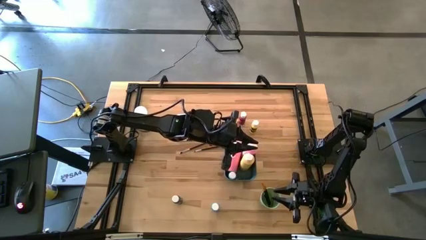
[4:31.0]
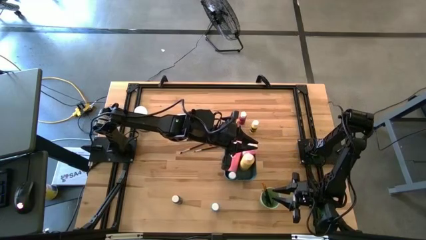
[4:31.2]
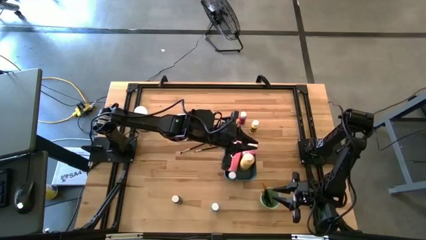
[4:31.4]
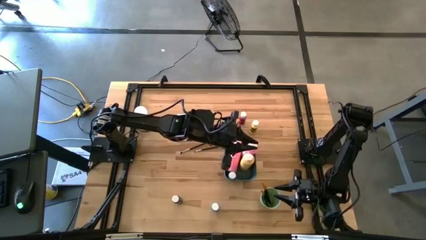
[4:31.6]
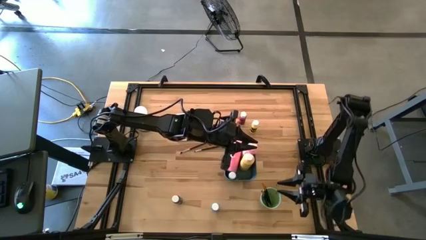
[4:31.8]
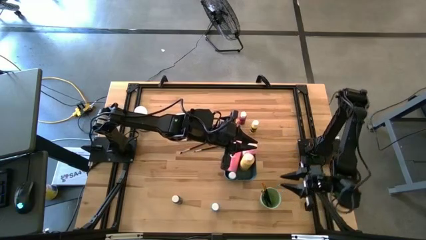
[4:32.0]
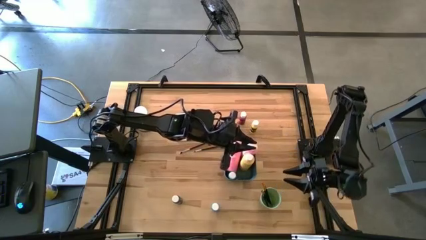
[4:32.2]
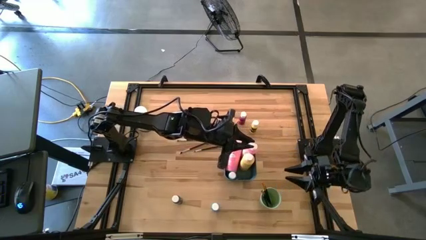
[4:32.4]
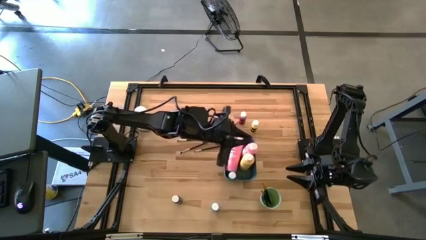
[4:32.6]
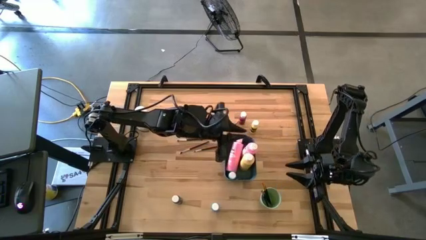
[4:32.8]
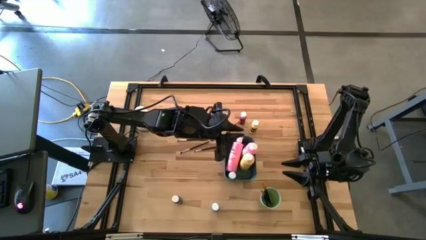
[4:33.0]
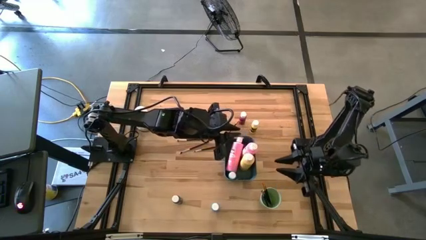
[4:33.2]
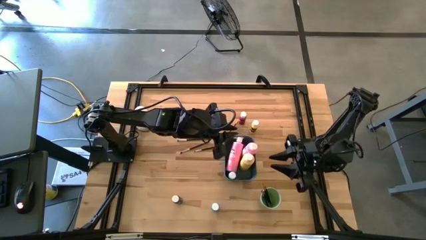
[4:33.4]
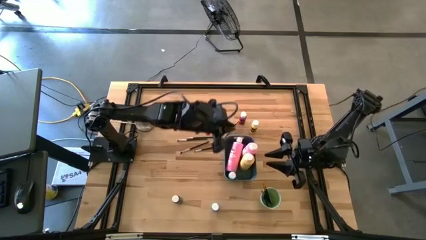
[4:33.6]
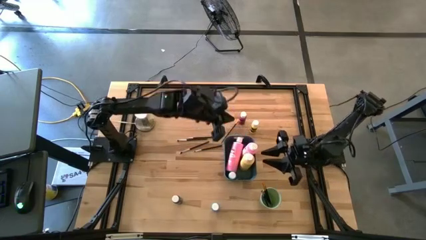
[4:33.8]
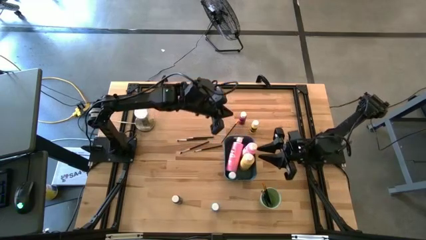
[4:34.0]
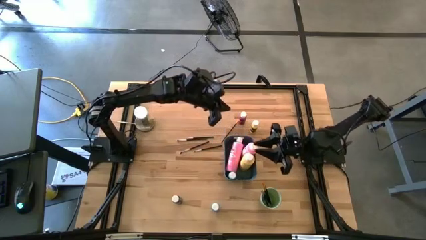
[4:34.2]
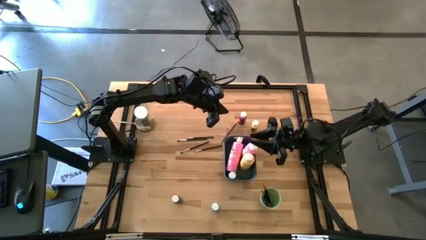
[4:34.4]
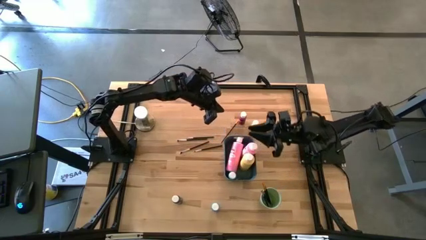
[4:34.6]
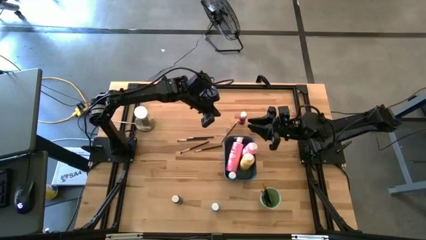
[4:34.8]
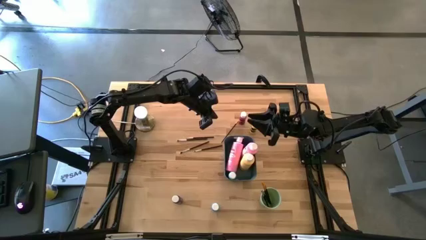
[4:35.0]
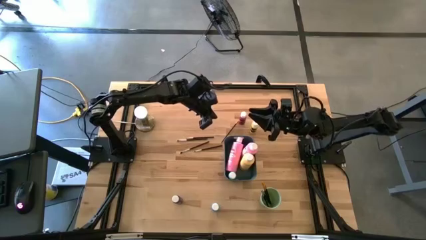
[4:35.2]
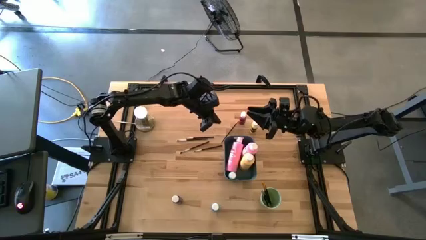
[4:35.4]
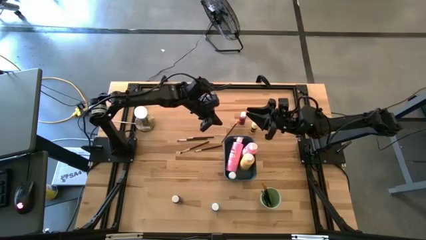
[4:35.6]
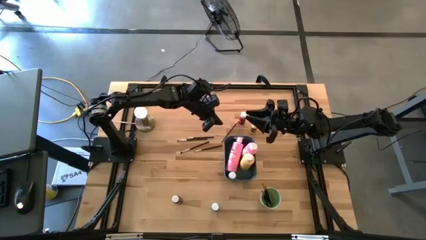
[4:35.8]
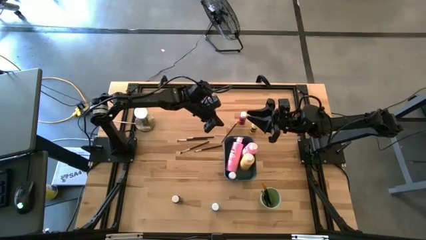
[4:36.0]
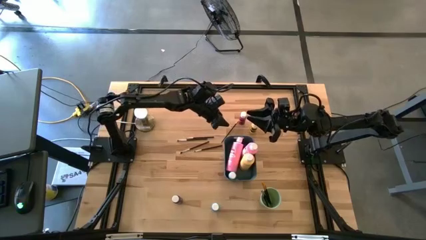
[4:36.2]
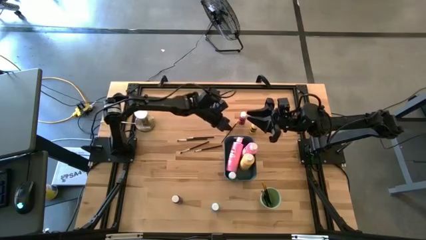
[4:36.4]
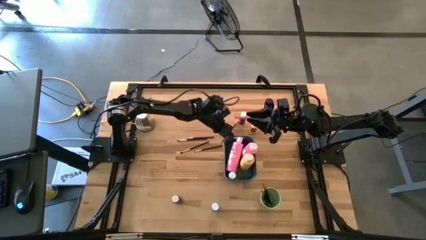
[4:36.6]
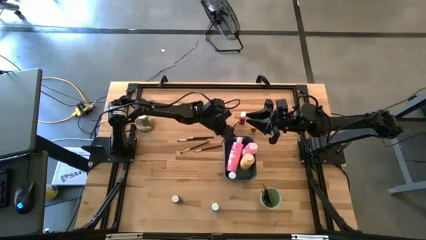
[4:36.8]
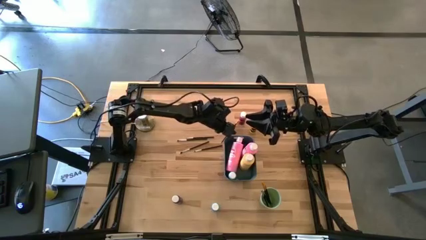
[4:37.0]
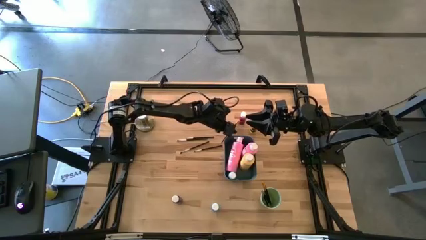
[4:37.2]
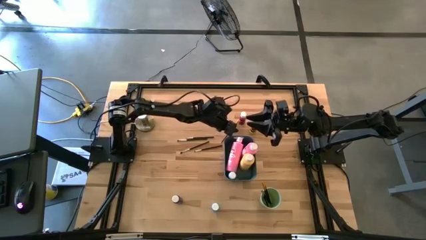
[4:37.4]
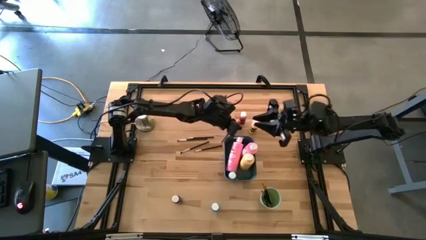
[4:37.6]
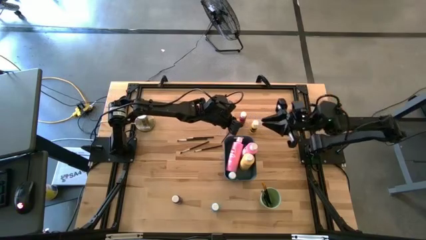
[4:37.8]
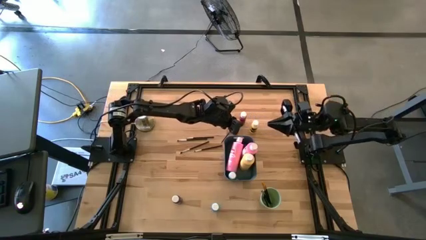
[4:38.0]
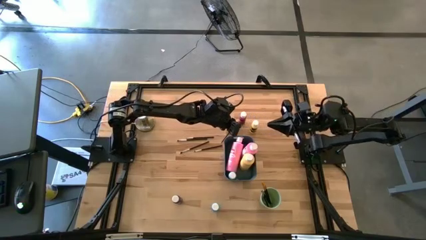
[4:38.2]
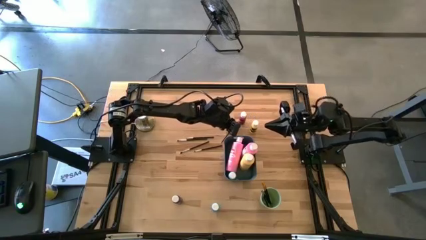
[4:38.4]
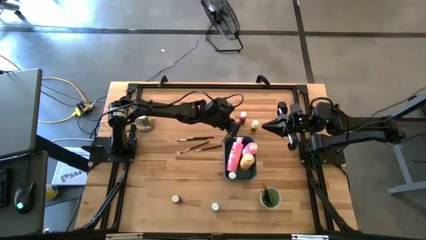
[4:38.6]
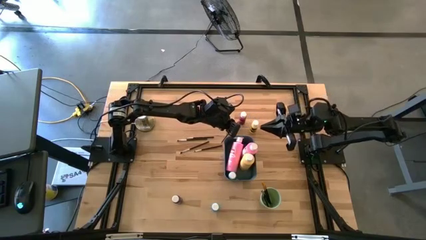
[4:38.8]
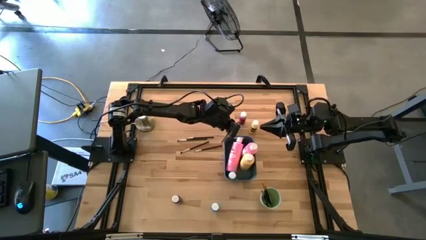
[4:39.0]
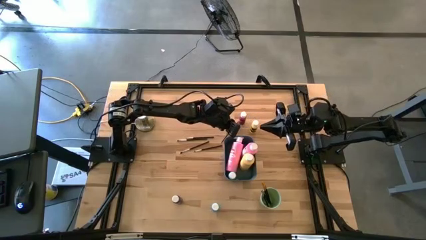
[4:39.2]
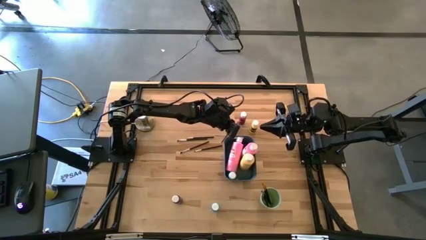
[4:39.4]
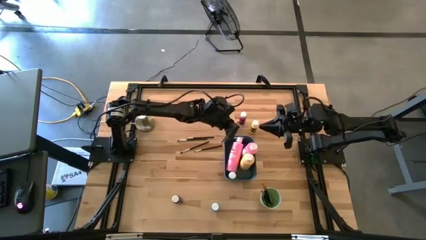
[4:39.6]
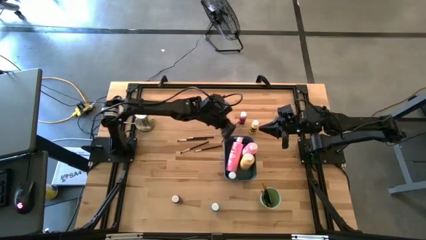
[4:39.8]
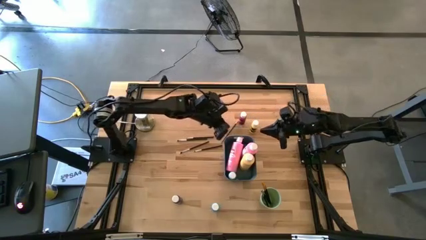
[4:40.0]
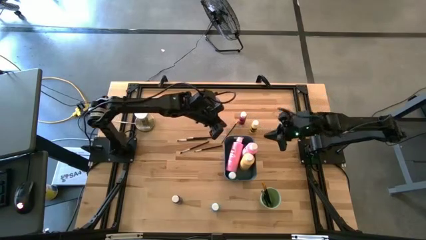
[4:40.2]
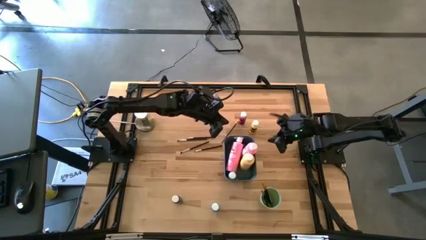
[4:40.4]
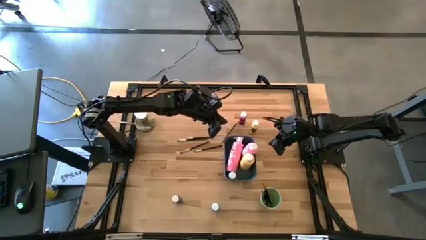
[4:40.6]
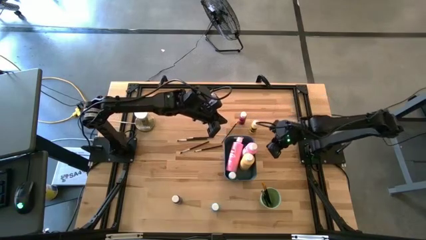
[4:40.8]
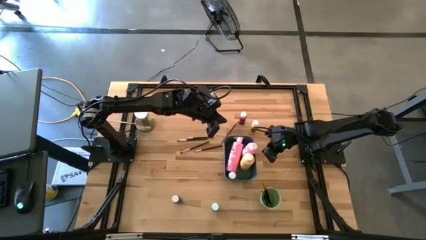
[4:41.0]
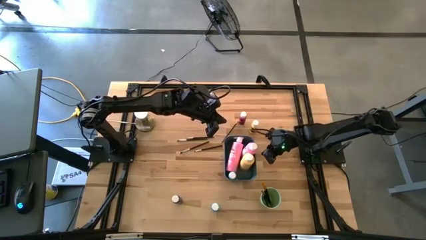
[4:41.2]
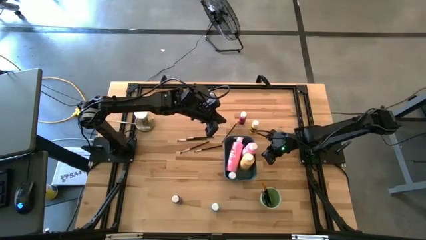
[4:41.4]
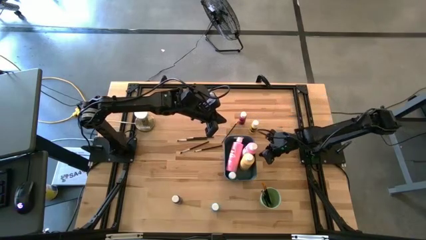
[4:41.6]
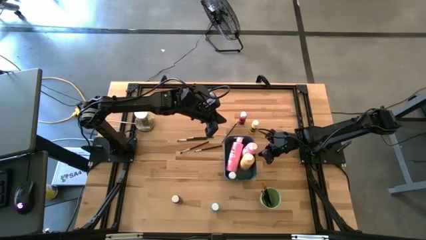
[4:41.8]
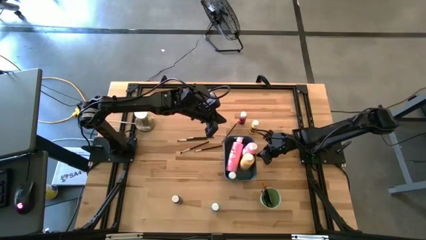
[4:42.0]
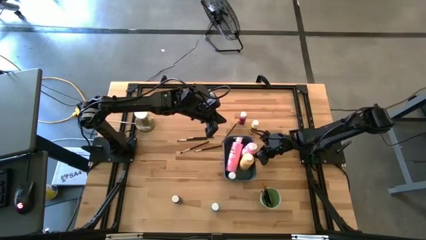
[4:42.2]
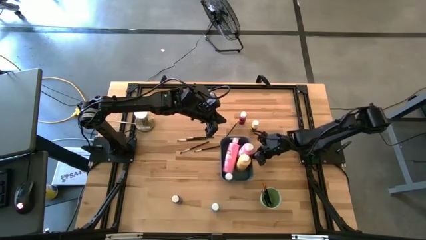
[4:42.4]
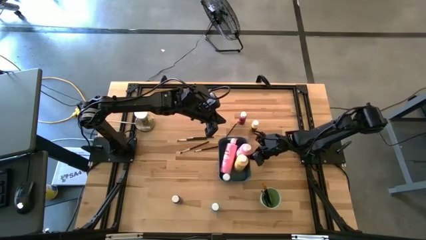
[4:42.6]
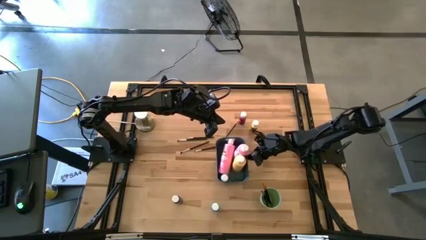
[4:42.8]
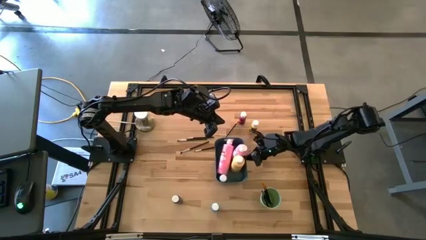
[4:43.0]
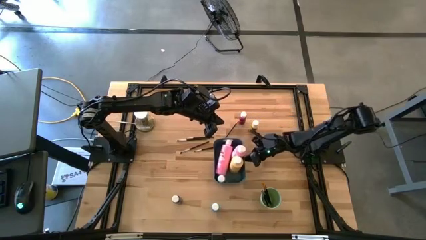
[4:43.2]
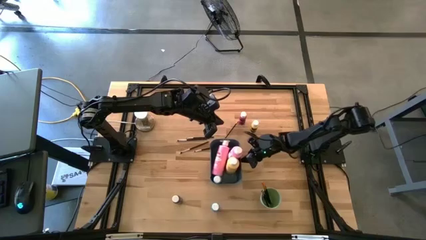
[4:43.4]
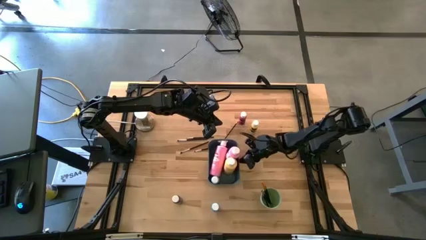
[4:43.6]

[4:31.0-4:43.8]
Task: Pick & Place Paint Supplies
Adjust the blue bin

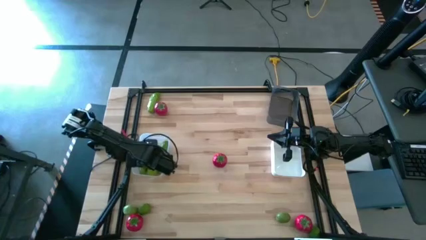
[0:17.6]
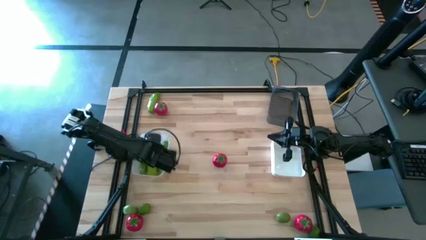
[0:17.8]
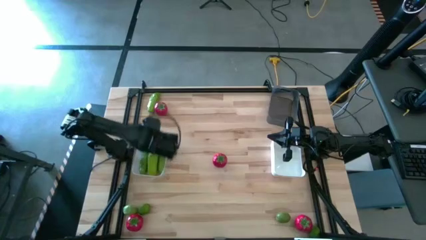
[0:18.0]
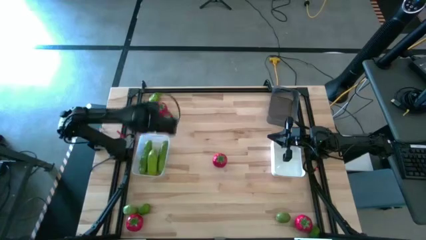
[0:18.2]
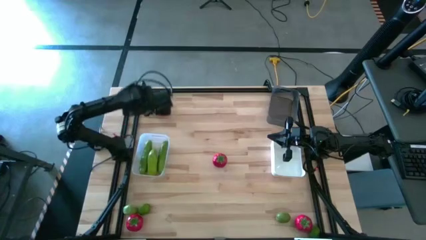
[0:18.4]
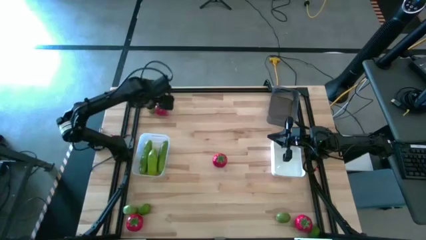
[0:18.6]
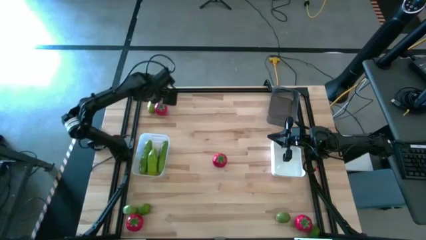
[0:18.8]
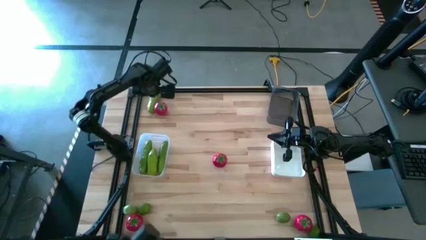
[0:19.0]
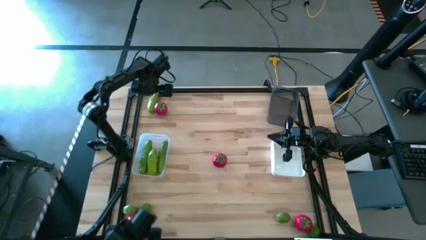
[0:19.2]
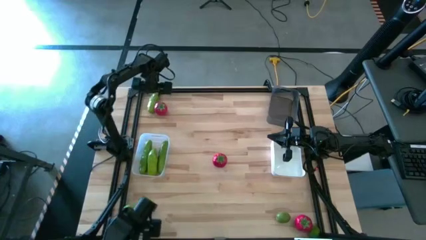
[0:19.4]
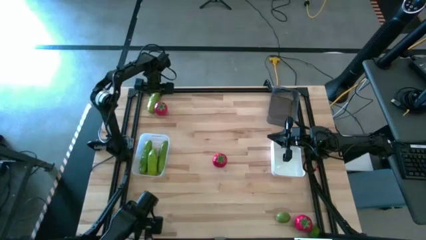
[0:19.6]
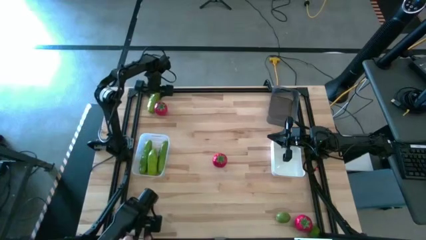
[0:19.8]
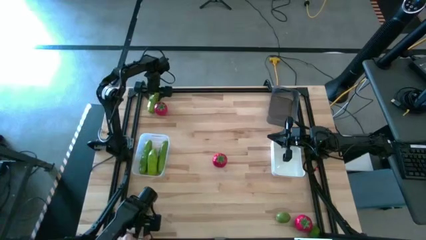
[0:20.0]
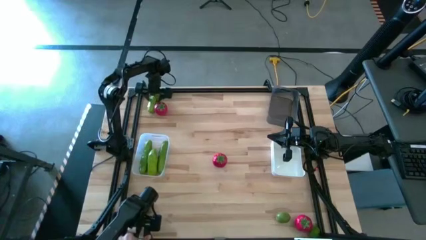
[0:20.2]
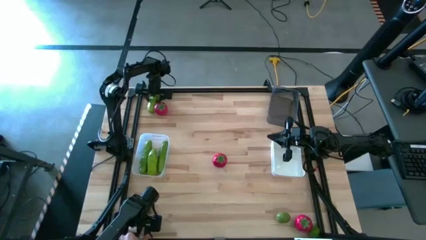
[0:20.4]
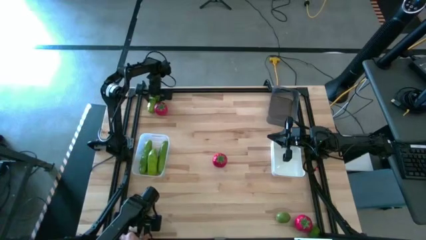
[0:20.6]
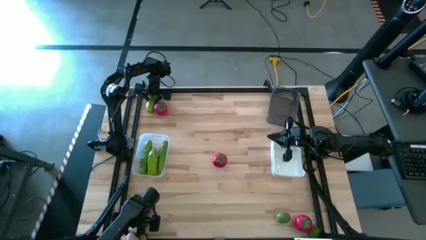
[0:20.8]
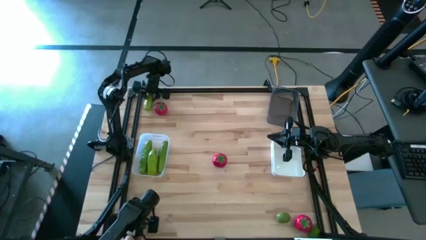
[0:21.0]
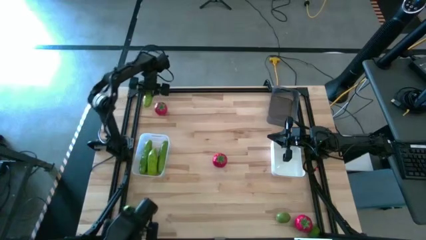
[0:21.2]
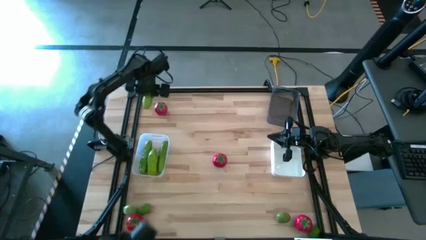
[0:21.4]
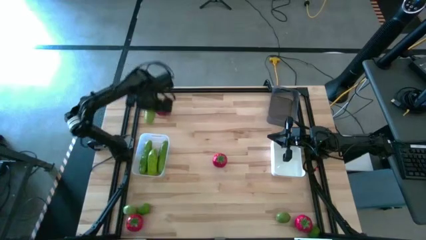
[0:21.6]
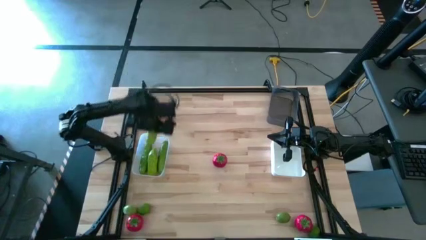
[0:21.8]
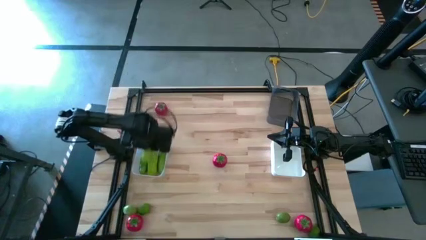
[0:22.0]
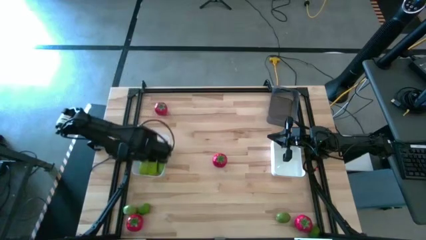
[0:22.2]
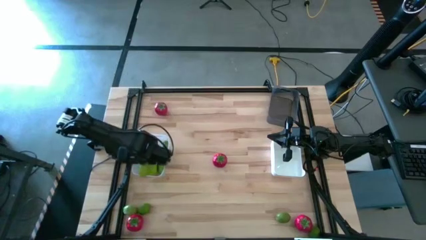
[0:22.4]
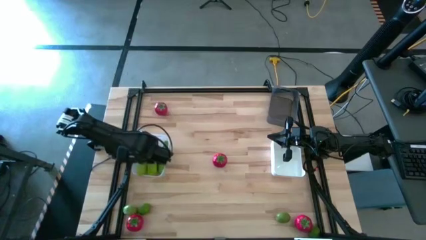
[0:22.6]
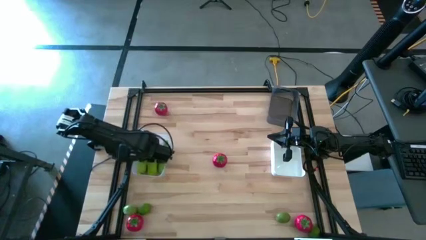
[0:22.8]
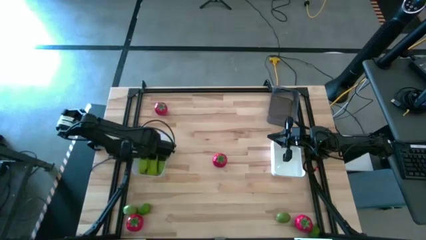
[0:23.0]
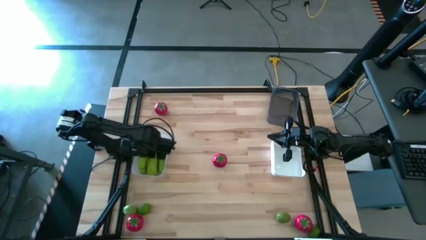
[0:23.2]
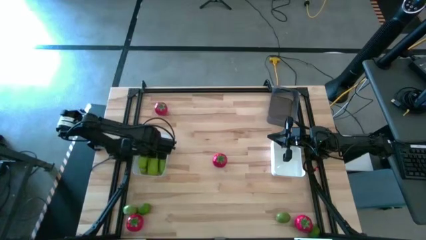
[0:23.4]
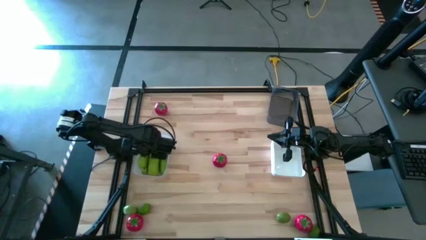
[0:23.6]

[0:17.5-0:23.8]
Task: Sort produce into baskets
Put the cucumber into the transparent bin
